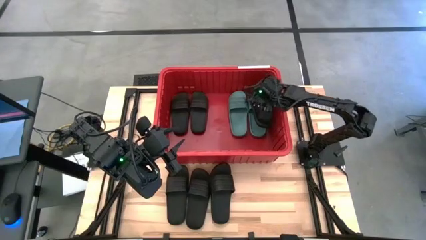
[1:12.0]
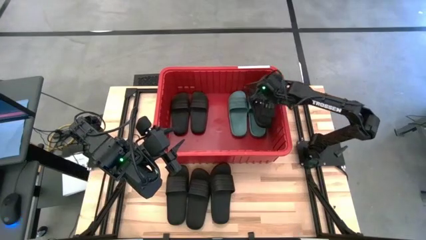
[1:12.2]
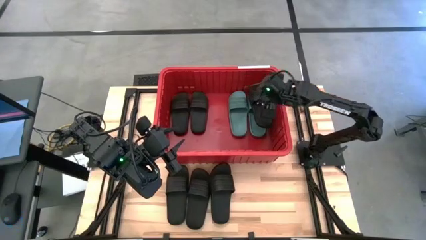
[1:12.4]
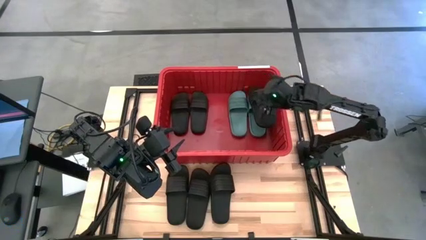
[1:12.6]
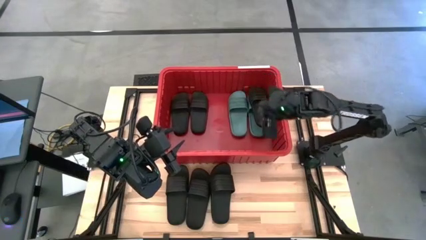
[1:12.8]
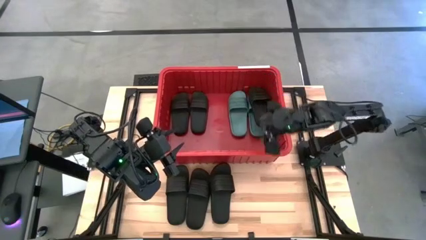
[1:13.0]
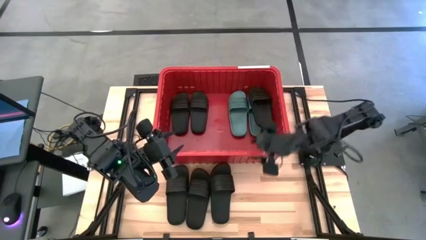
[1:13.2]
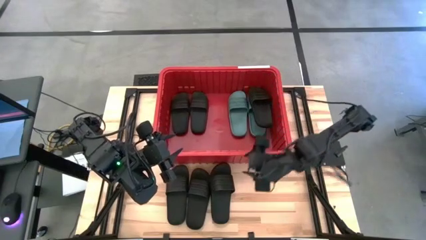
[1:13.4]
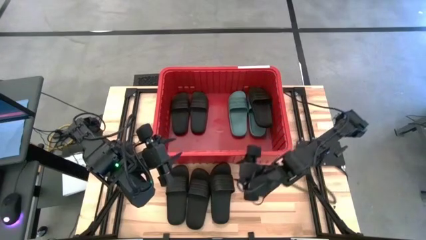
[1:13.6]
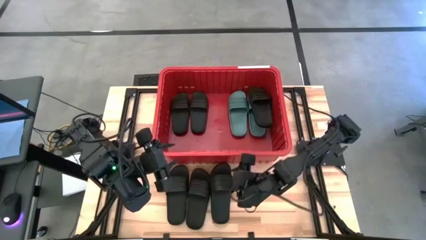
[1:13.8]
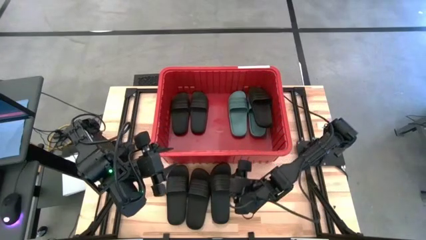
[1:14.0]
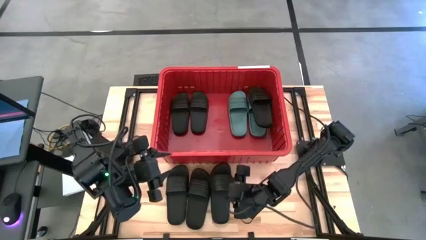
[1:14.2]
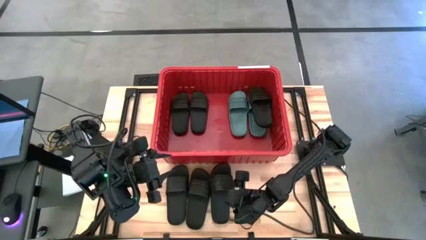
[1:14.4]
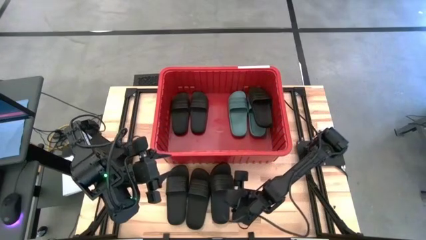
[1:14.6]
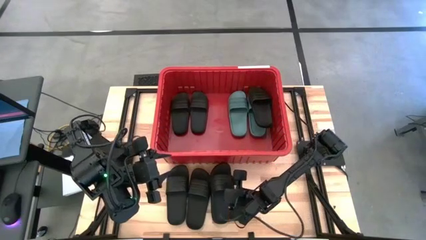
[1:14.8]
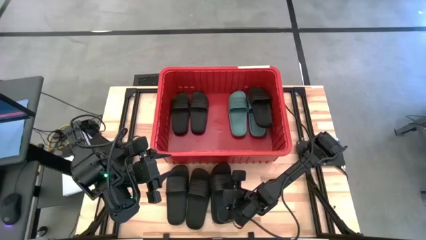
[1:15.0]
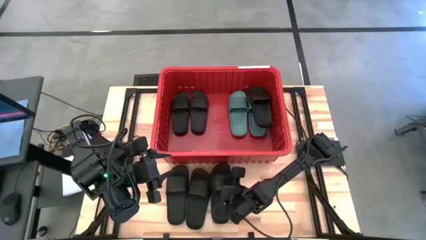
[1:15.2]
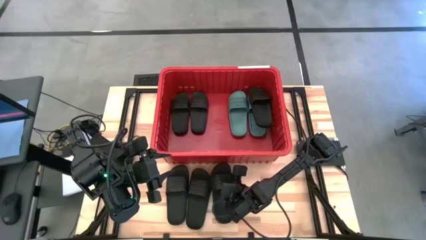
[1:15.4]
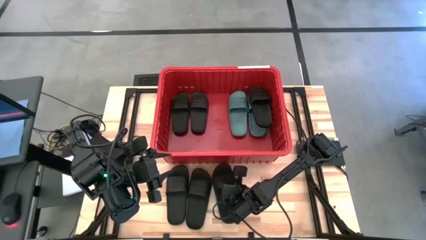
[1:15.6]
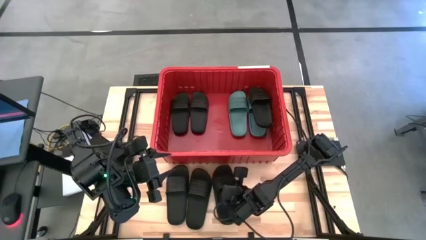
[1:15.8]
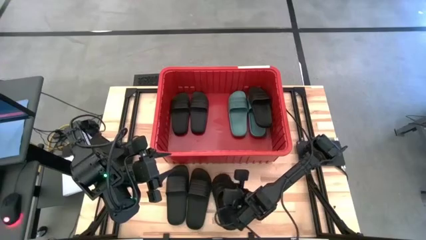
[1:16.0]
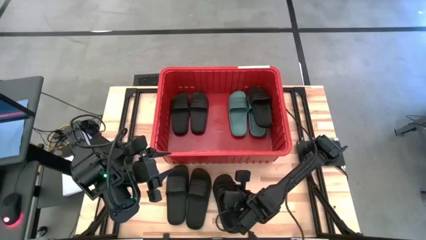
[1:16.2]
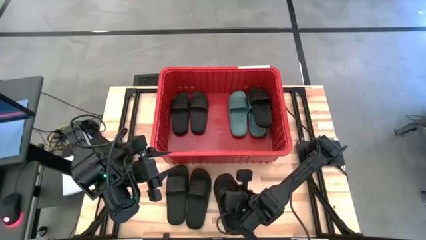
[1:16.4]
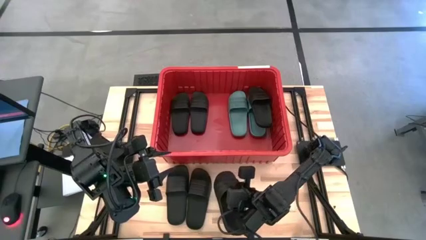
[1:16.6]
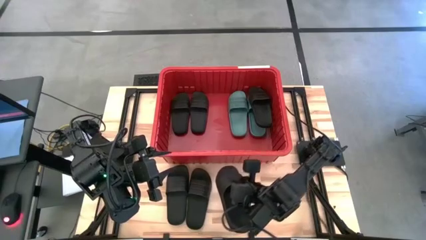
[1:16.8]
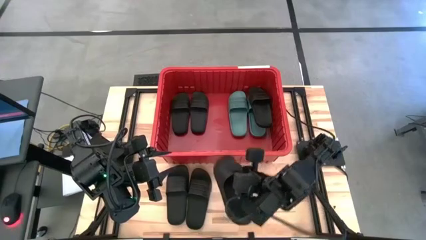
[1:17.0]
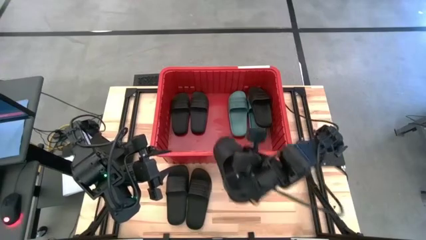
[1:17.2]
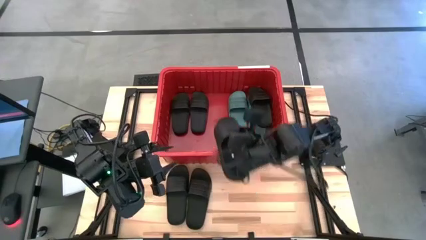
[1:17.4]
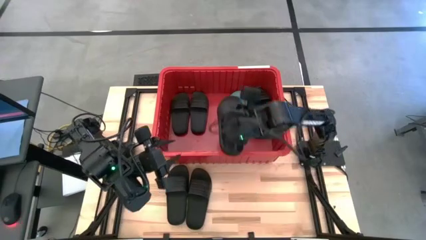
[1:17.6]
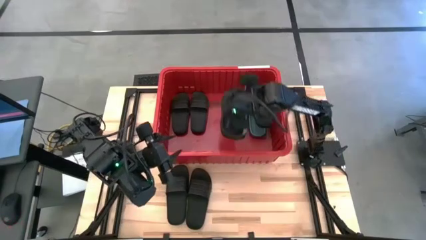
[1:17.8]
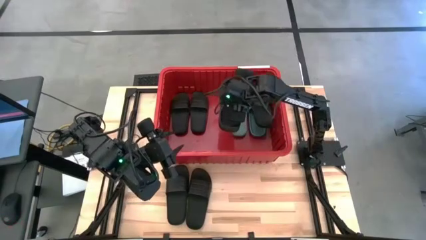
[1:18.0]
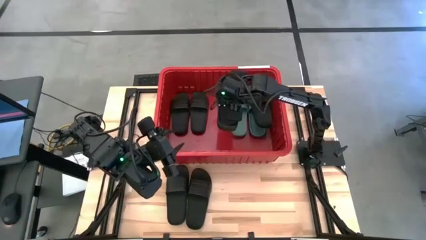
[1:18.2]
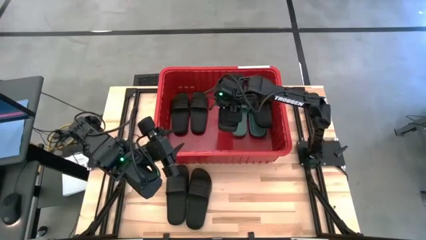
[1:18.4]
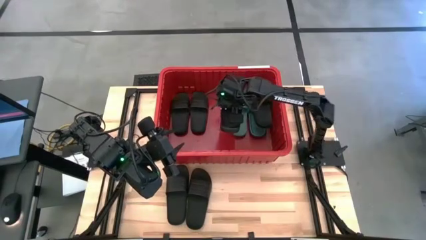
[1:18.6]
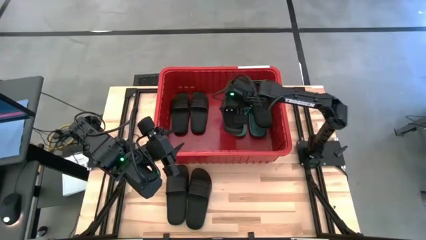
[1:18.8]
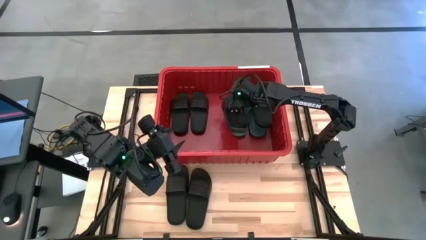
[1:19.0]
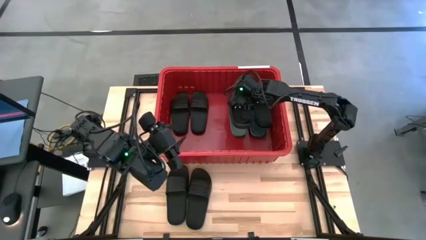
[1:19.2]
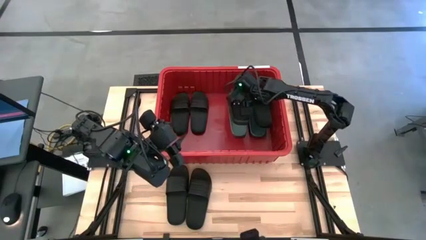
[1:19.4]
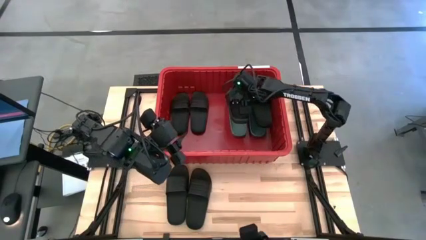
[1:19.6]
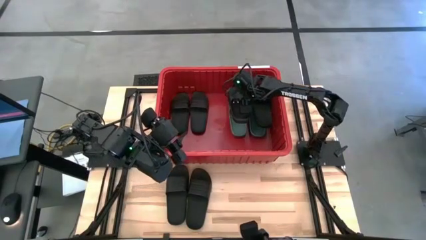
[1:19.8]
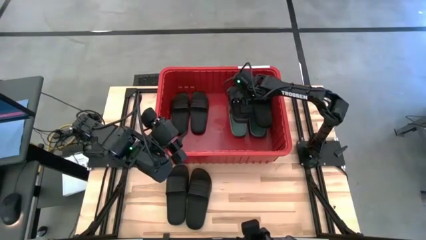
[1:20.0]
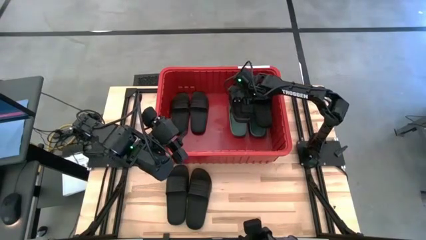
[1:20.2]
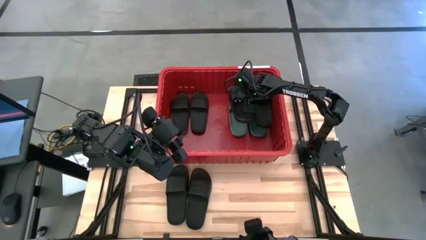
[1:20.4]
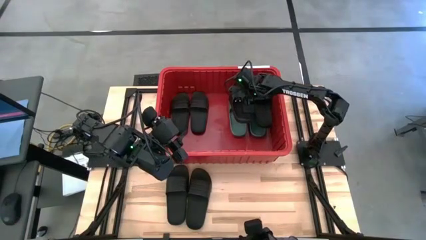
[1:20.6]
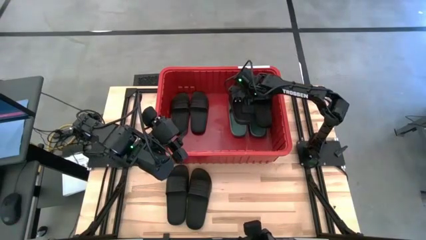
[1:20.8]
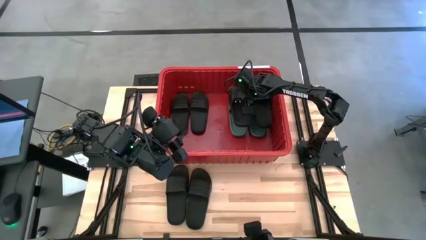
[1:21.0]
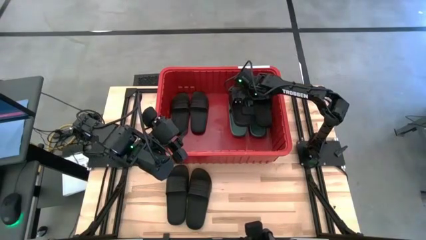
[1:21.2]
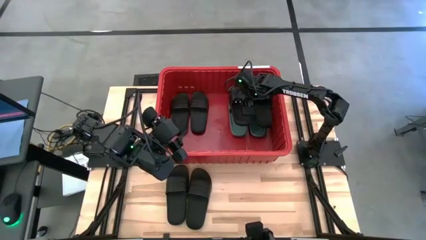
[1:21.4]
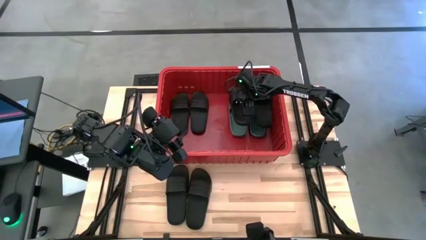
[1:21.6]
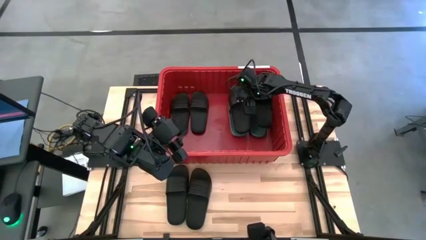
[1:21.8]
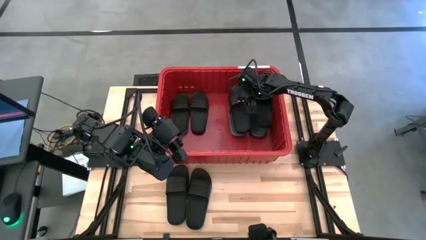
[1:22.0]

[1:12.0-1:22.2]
Task: Pick and place slides into bin
Put the right black slipper into the red organizer bin

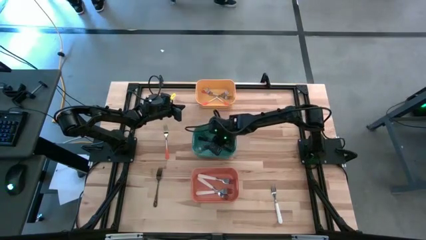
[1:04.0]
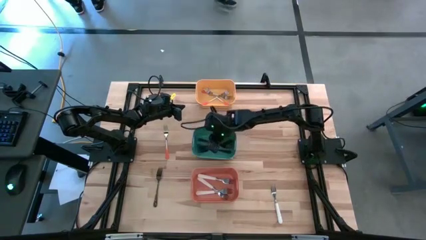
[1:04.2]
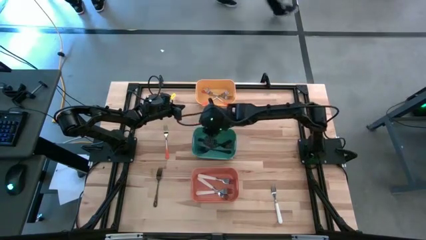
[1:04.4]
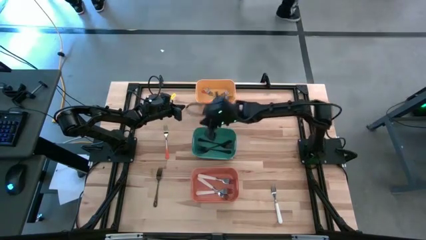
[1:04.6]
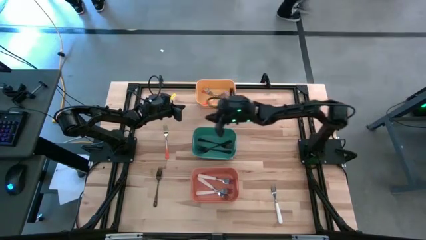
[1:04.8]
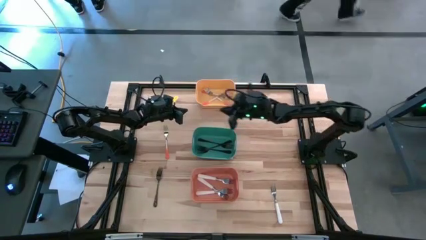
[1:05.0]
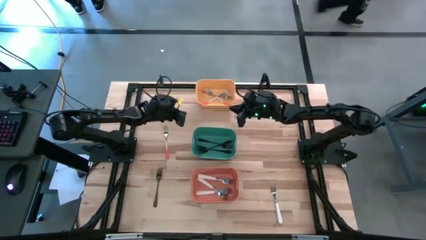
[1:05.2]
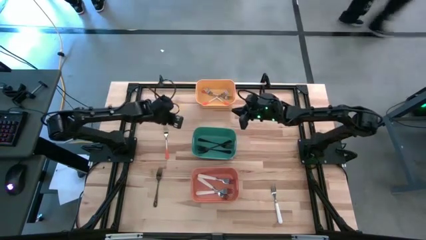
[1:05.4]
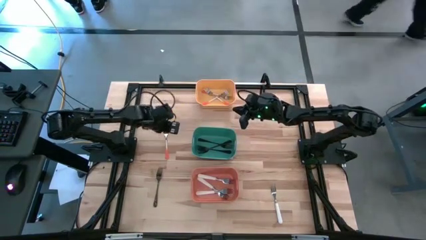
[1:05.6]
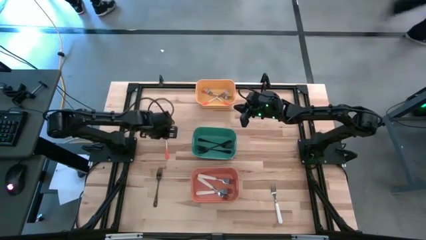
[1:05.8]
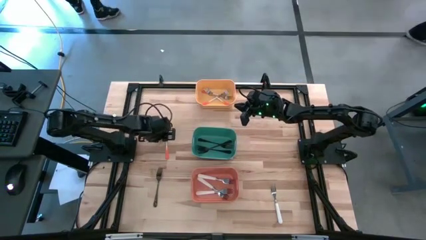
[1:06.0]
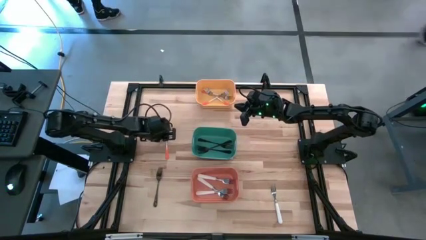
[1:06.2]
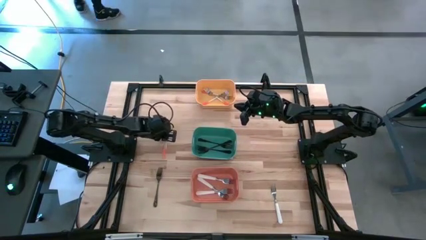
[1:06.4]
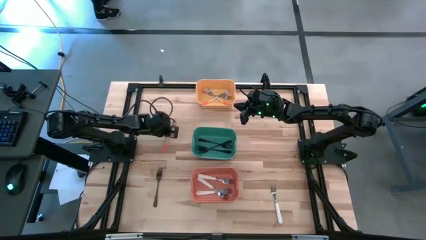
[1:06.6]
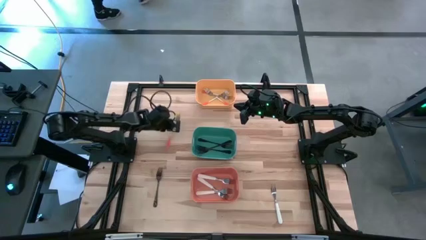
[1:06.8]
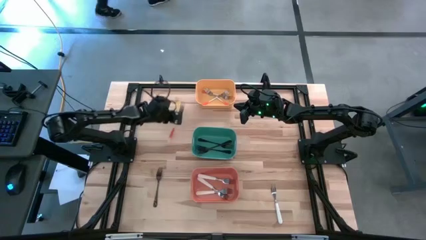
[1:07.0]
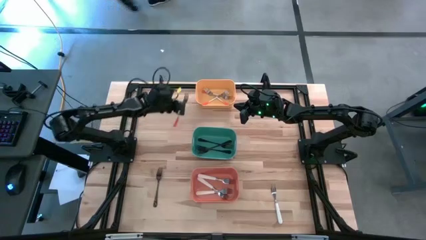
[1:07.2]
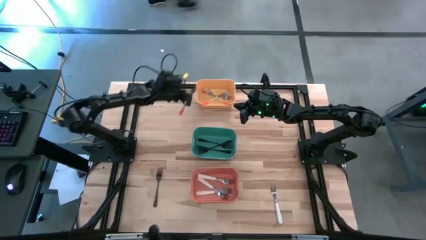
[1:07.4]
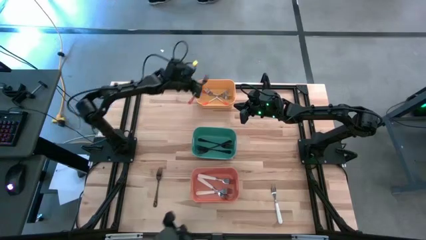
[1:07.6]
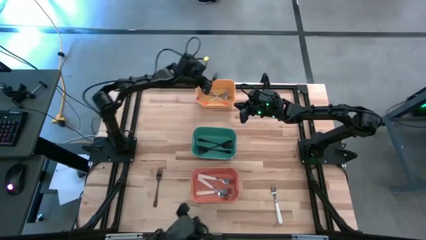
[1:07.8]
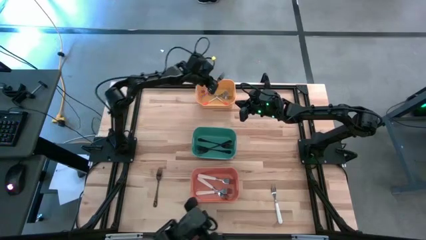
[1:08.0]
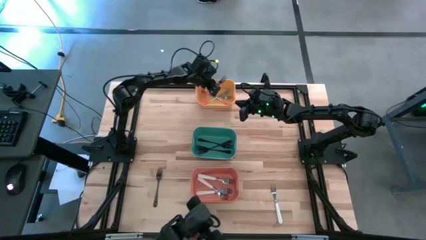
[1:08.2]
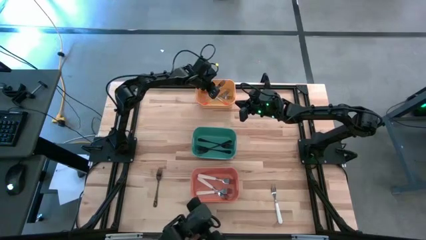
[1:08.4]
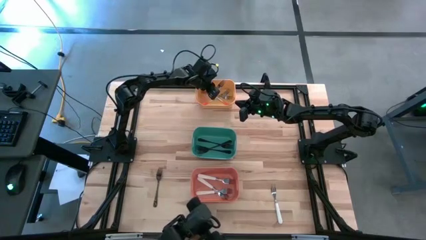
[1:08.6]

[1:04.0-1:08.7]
Task: Sort silverware by color (type)
Put the orange fork into the yellow bin

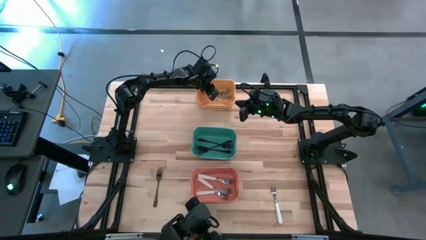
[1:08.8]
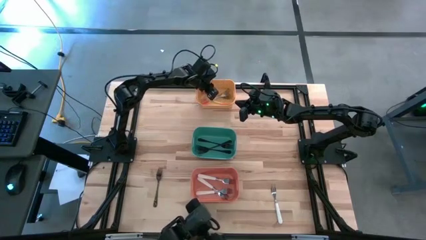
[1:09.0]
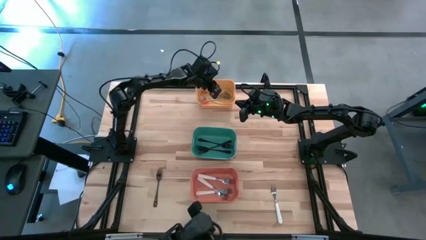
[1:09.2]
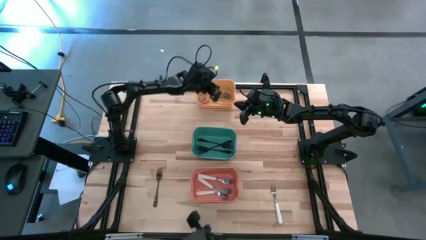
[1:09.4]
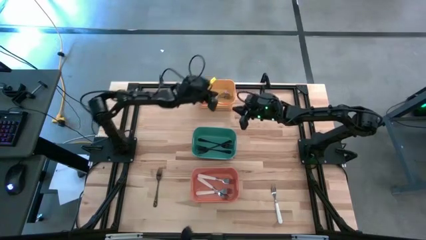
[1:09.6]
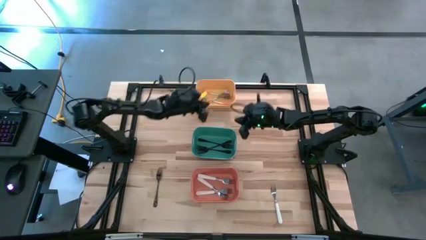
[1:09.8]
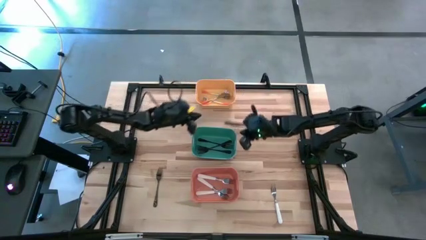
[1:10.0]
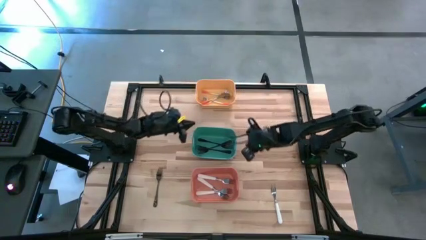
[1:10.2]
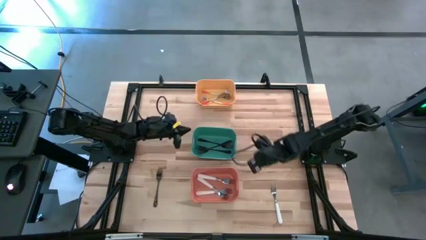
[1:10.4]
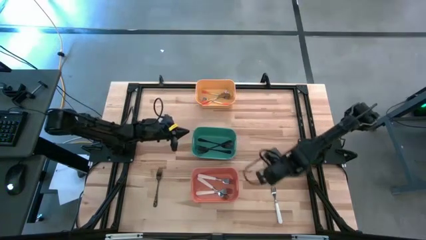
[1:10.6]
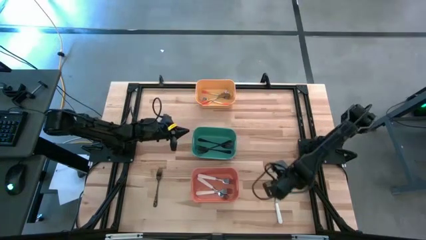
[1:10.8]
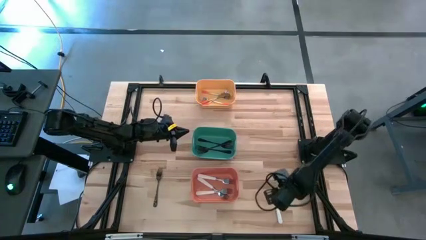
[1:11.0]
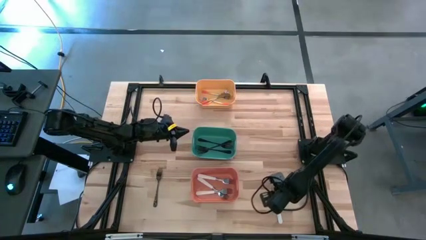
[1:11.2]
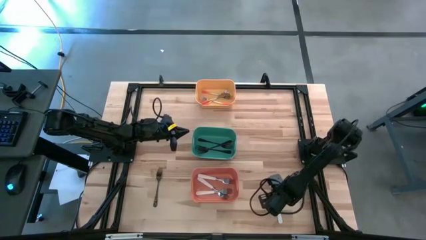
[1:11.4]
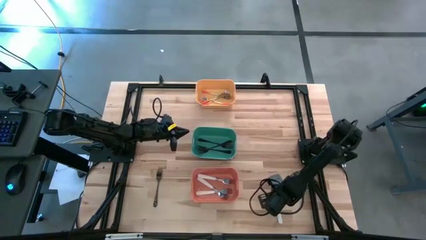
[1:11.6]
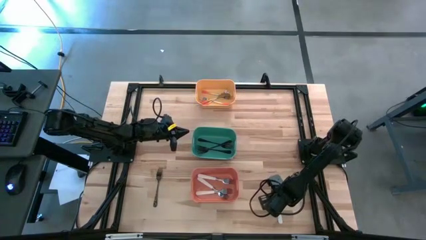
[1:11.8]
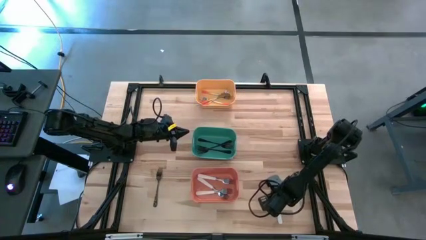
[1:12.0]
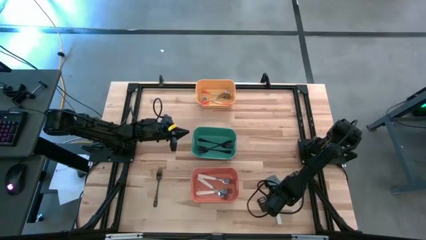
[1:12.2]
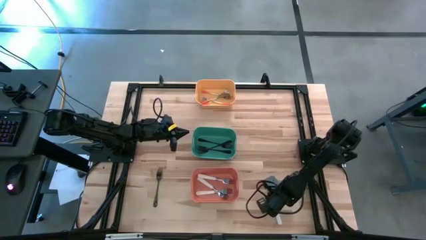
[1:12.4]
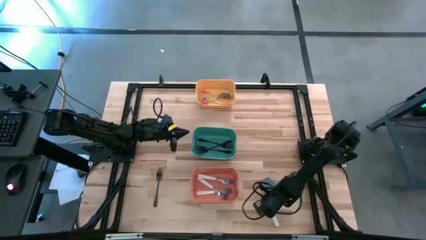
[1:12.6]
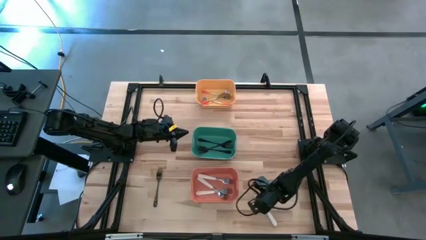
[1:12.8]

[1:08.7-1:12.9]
Put the white fork into the orange bin
